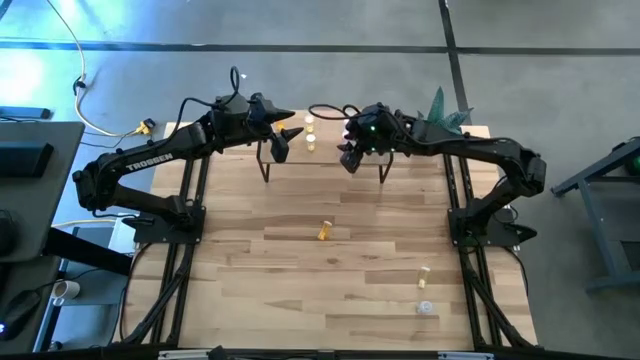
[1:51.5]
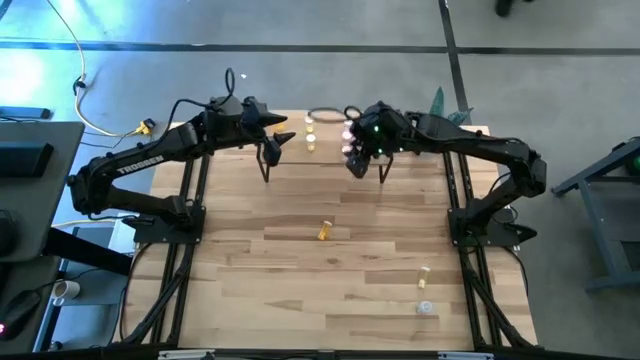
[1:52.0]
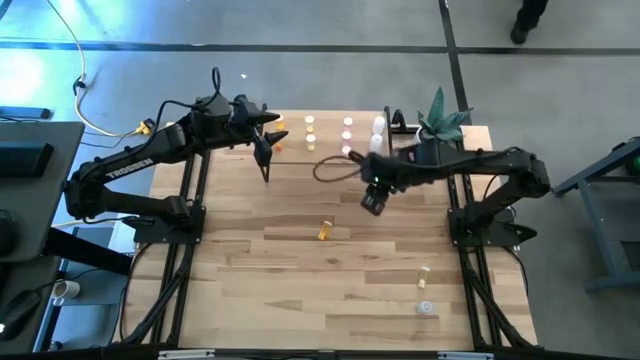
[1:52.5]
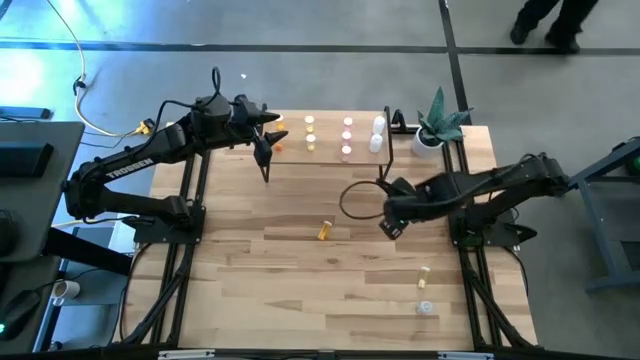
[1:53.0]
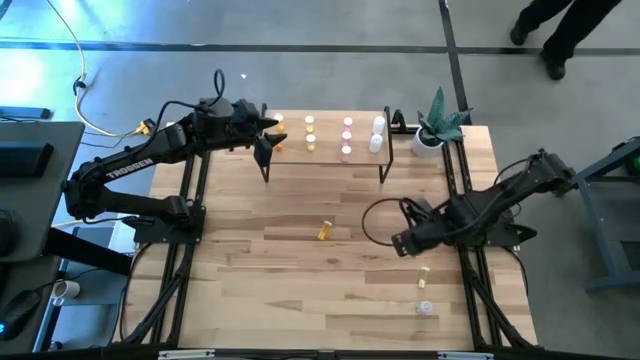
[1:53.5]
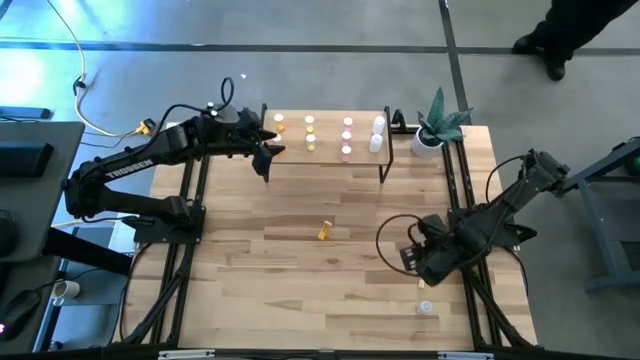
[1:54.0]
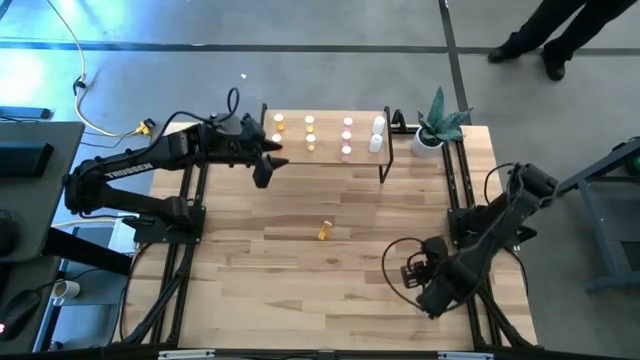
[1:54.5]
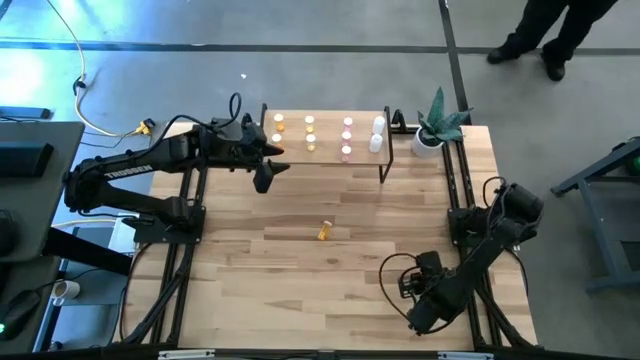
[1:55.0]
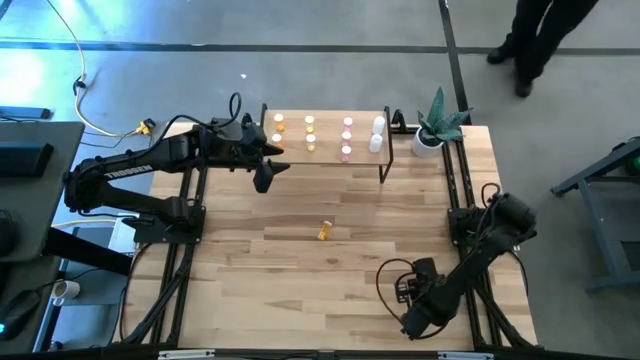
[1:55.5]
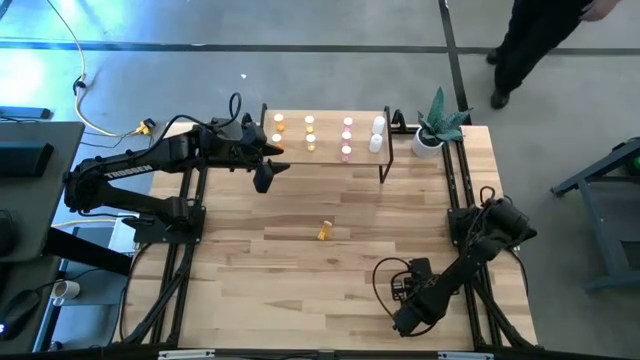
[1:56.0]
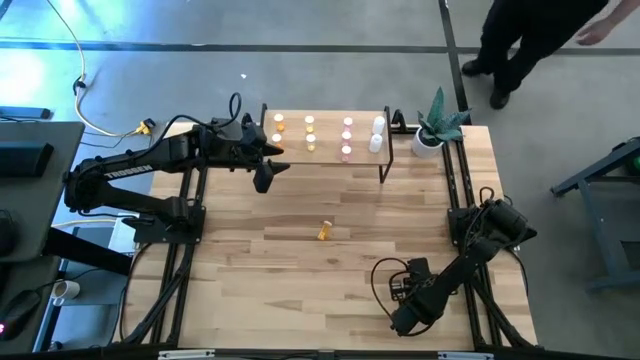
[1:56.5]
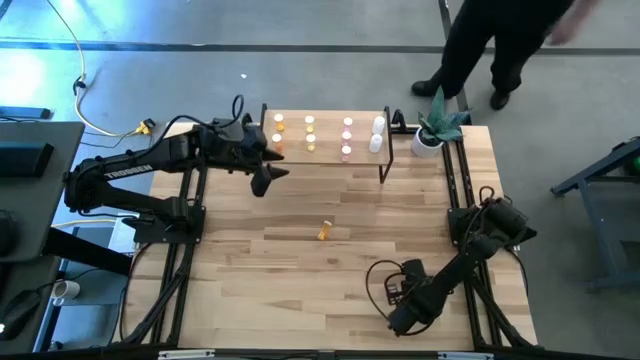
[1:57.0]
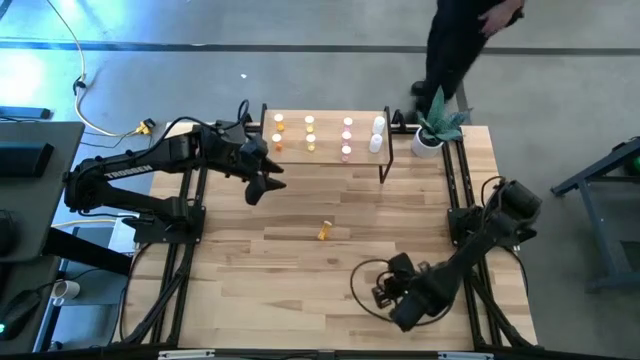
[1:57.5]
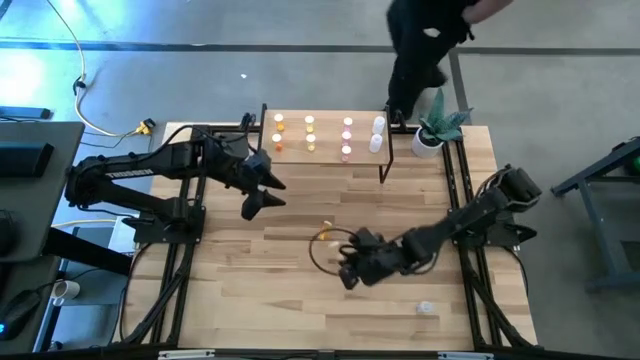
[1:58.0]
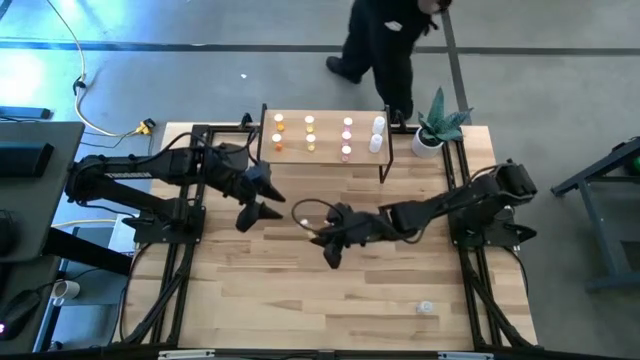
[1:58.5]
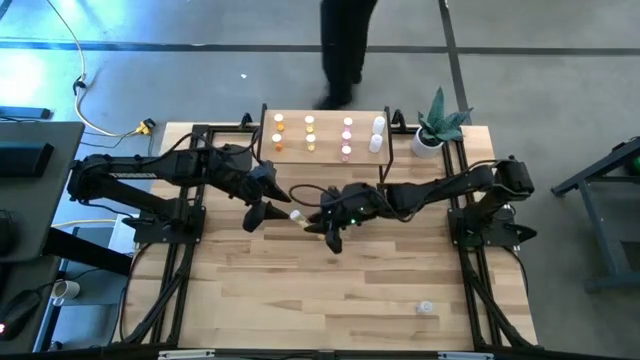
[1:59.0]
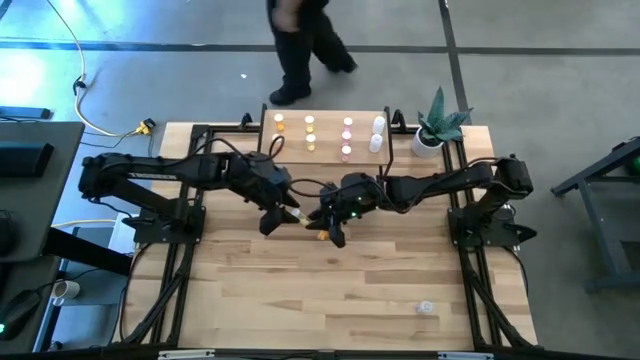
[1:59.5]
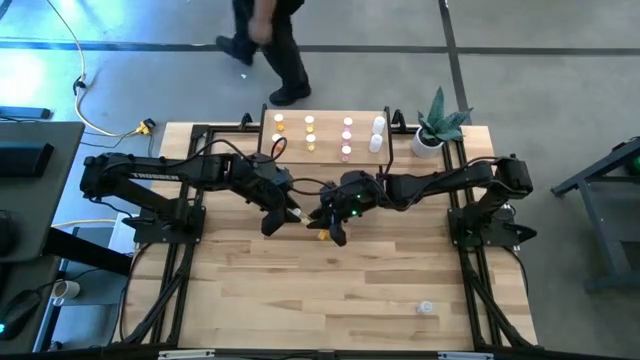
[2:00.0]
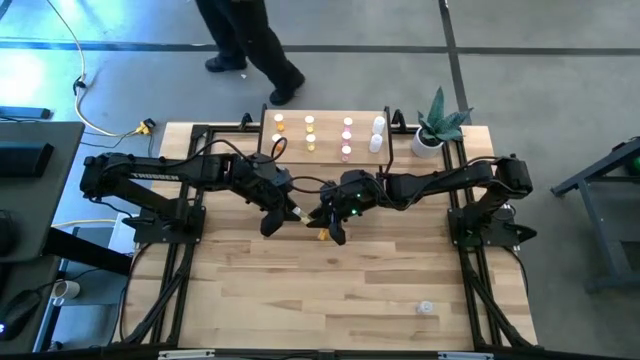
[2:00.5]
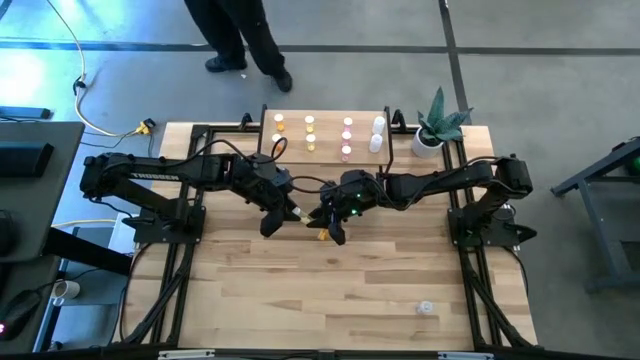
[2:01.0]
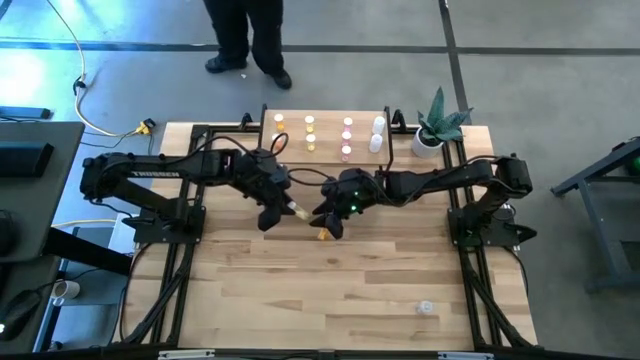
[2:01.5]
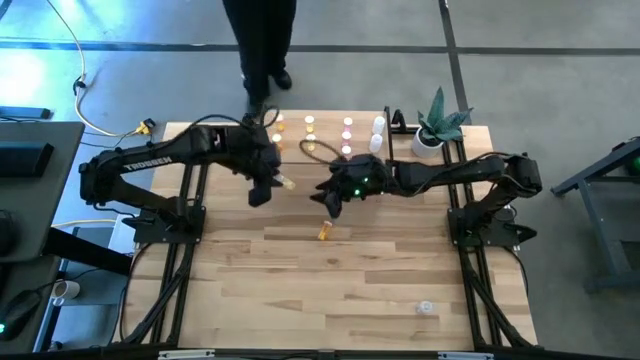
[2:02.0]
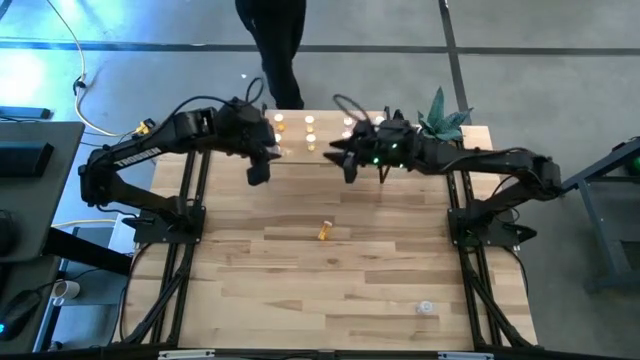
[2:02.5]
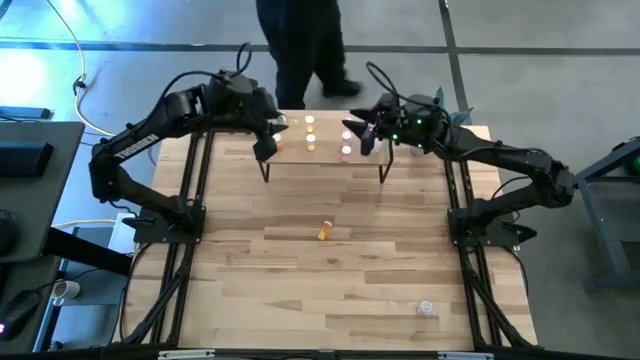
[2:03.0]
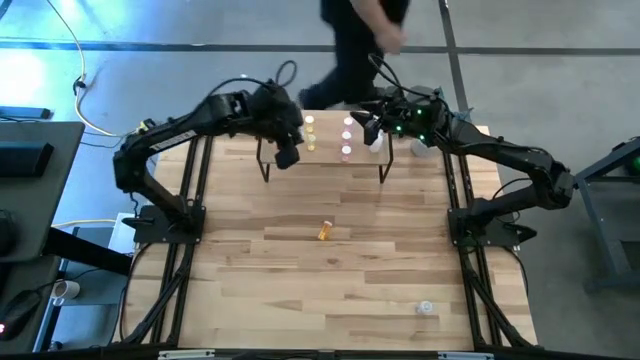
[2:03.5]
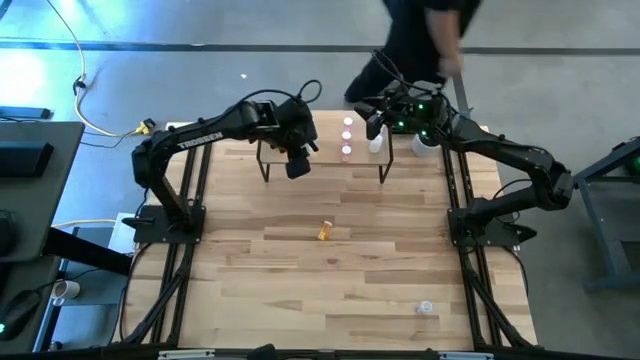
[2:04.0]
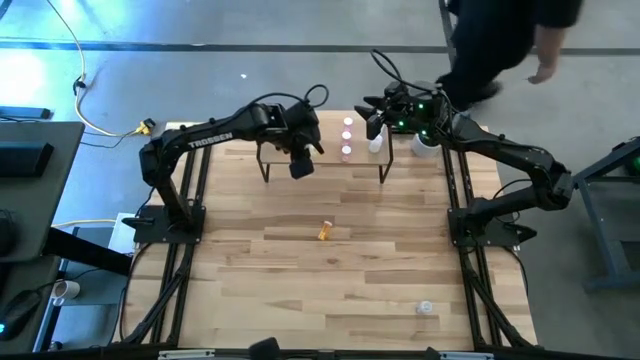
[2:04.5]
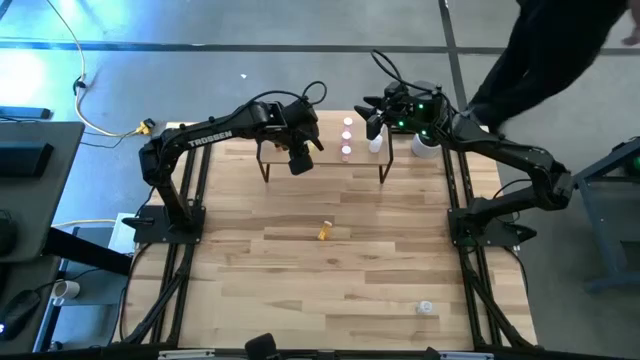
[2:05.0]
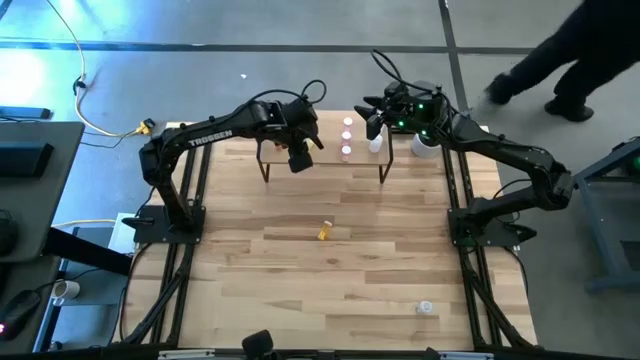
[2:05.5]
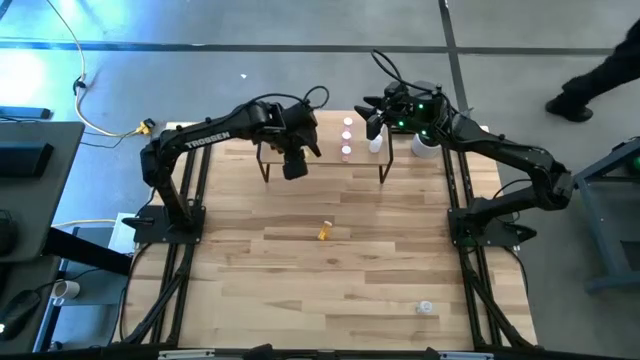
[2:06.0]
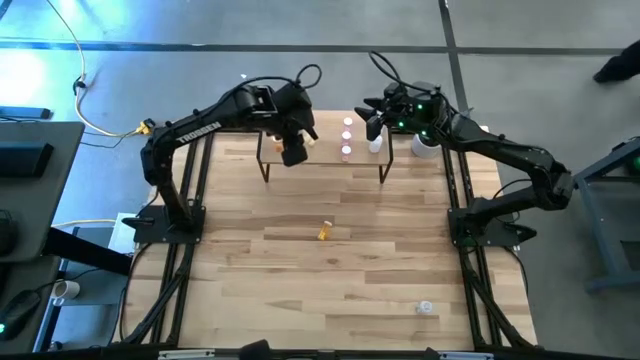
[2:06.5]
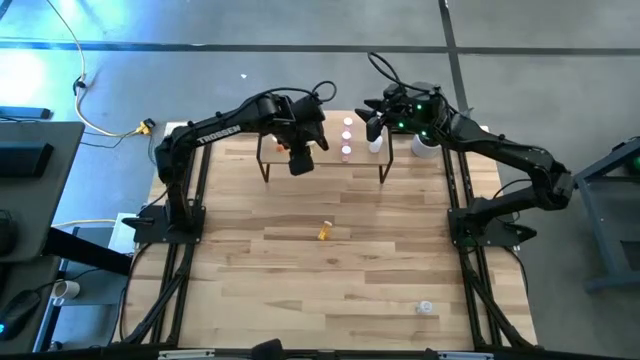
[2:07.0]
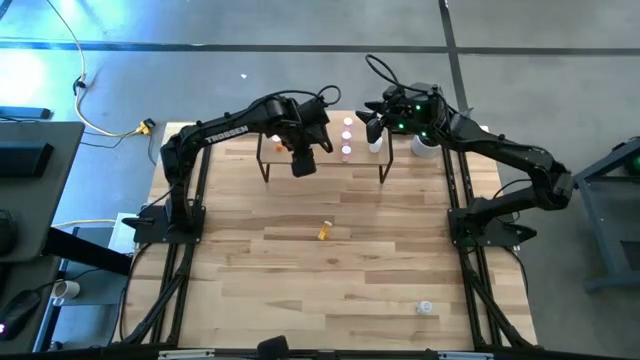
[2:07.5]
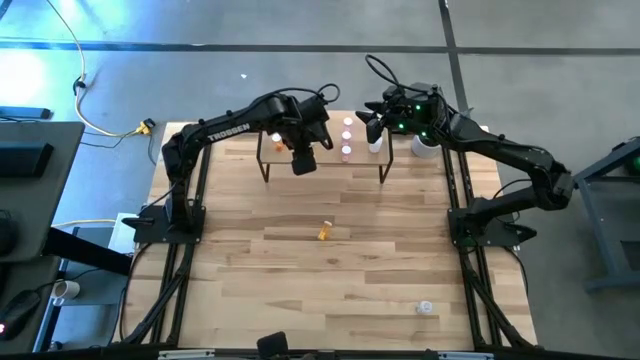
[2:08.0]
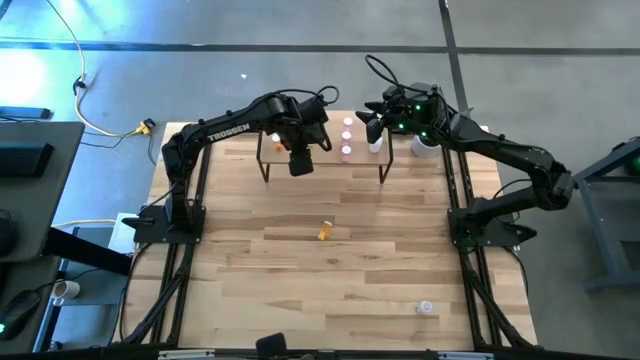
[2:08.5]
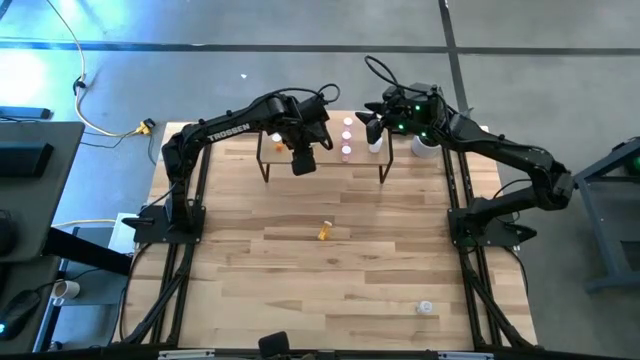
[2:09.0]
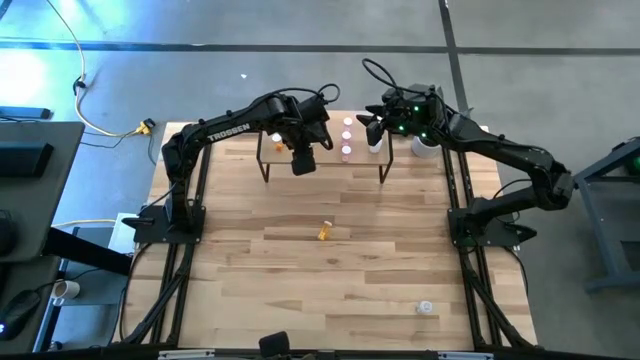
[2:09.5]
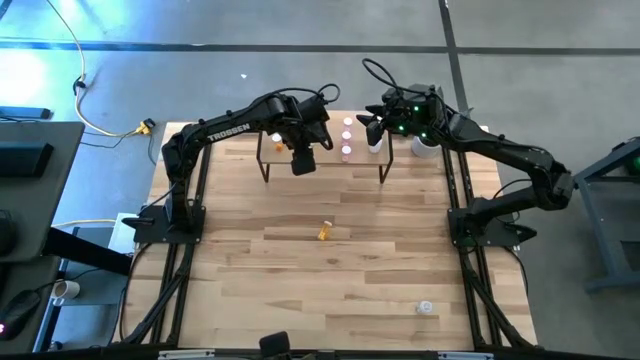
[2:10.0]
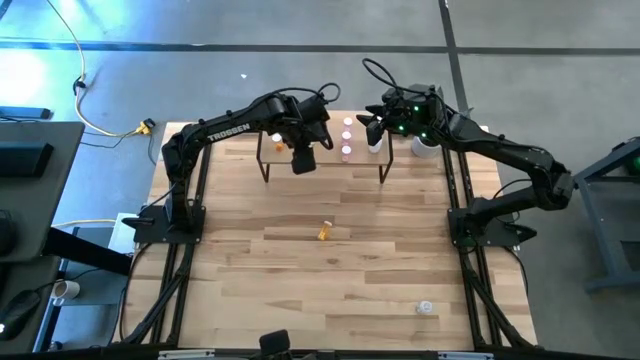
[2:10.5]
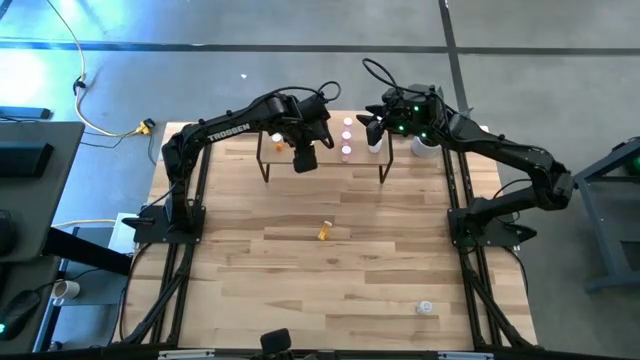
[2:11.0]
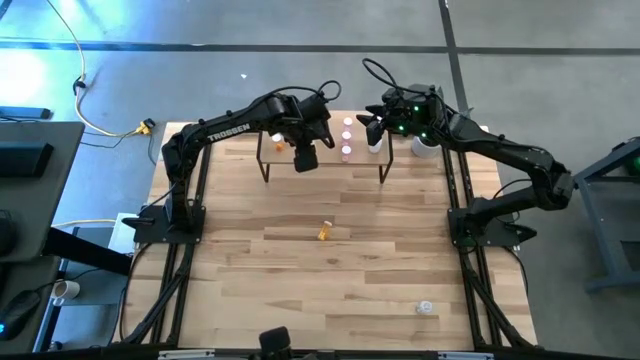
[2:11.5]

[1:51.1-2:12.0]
Task: Pick and place medicine bottles onto shelf by color
Put the yellow pill bottle on the shelf aligned with other yellow pill bottles
